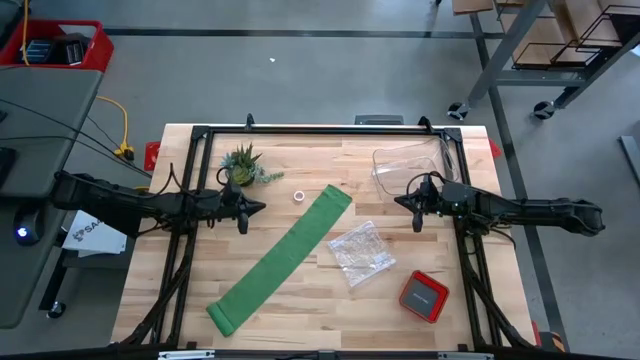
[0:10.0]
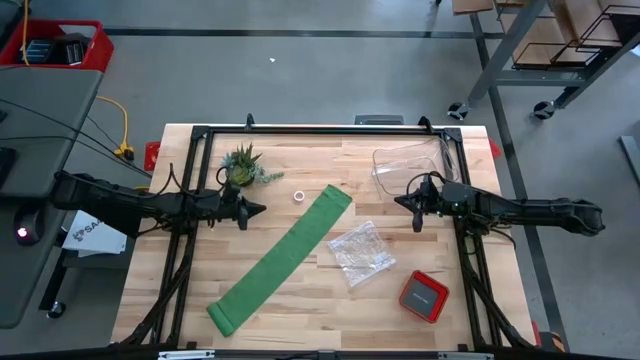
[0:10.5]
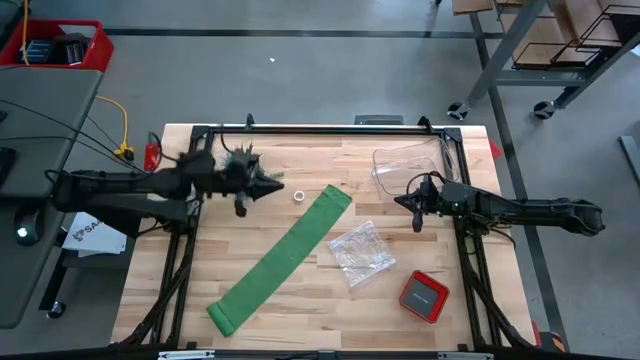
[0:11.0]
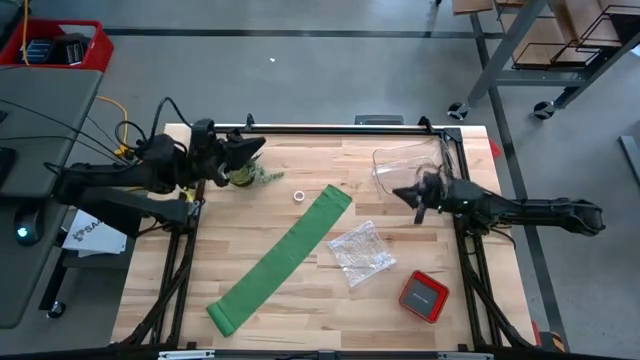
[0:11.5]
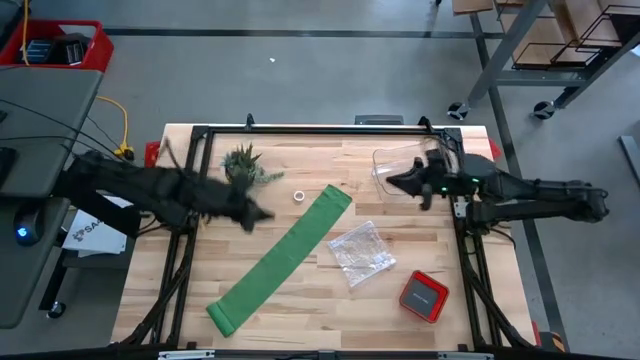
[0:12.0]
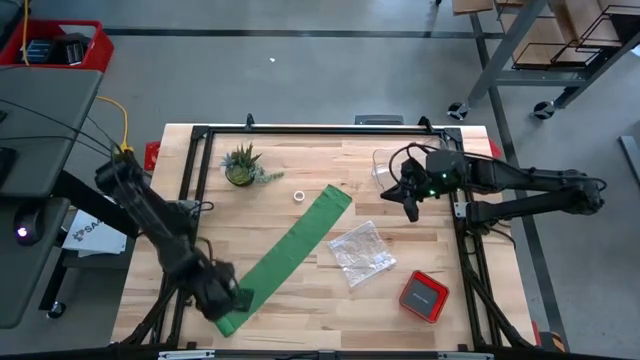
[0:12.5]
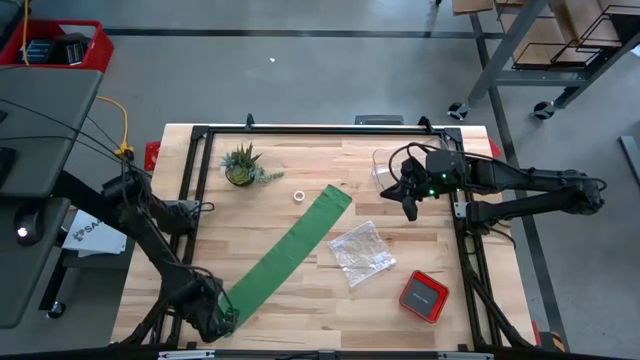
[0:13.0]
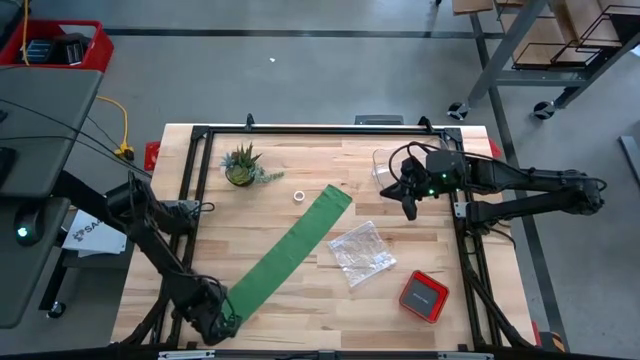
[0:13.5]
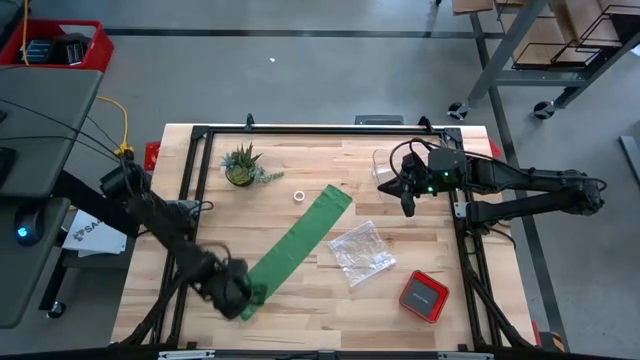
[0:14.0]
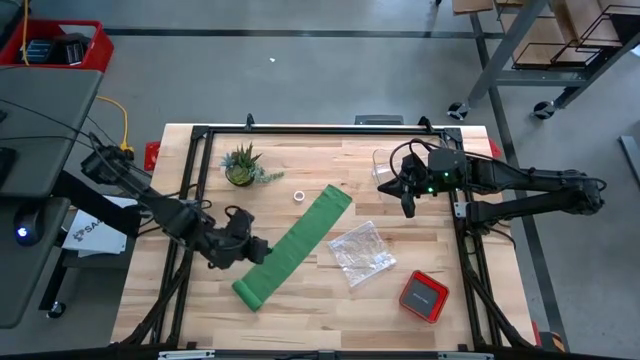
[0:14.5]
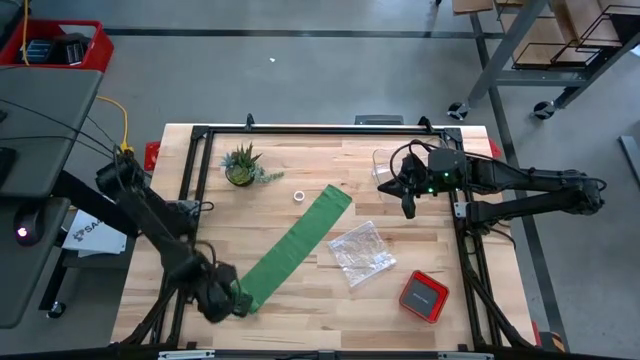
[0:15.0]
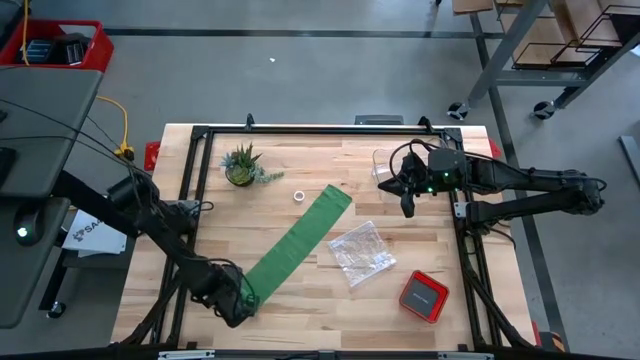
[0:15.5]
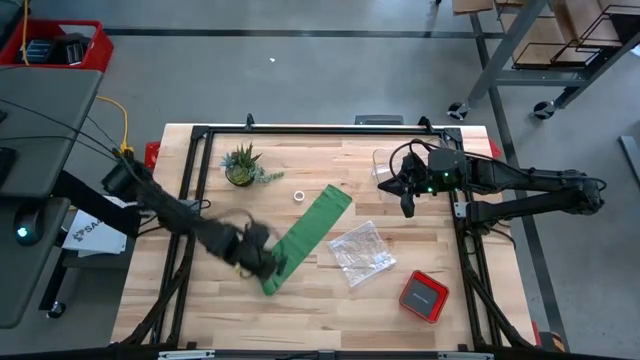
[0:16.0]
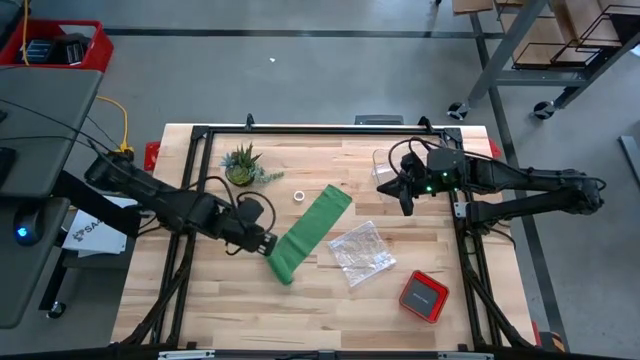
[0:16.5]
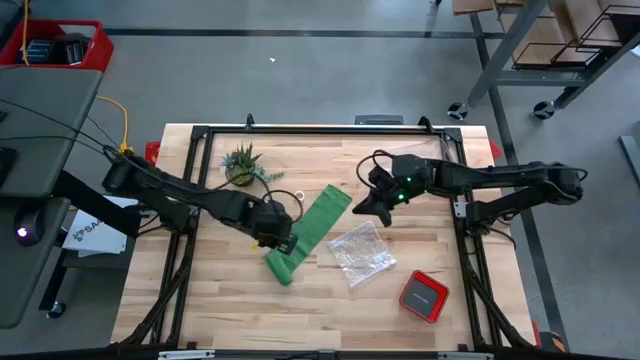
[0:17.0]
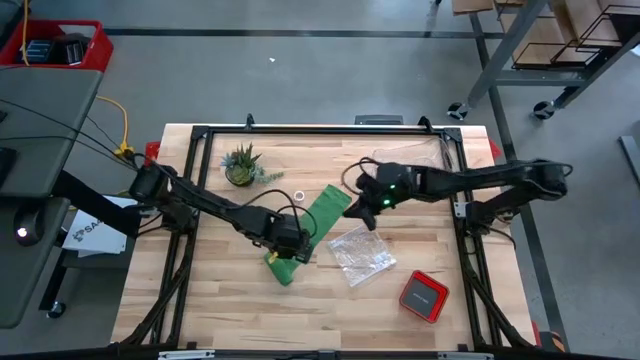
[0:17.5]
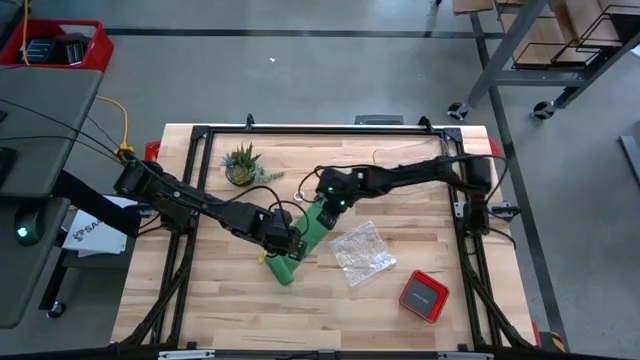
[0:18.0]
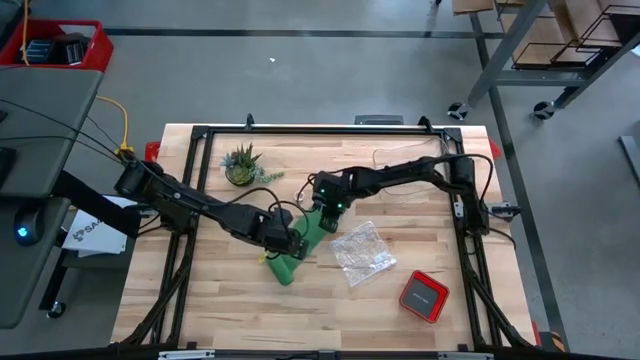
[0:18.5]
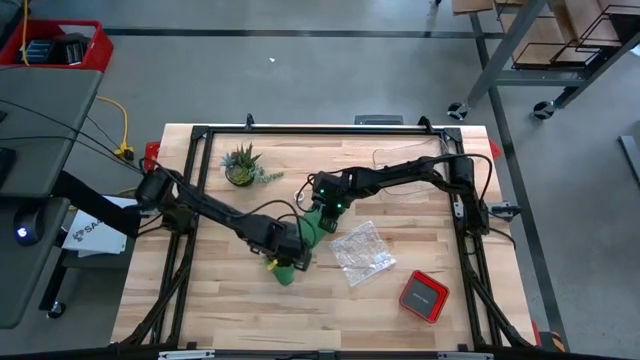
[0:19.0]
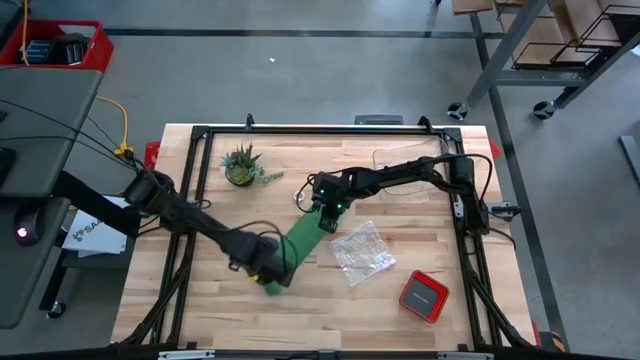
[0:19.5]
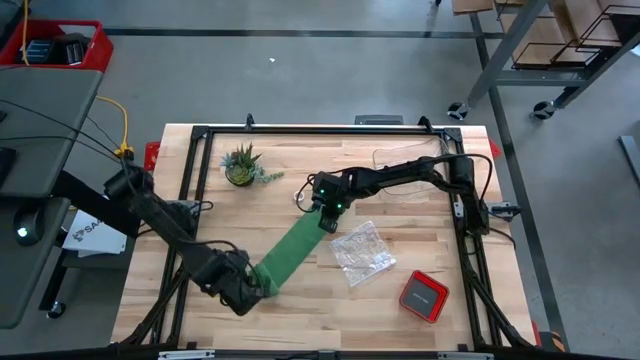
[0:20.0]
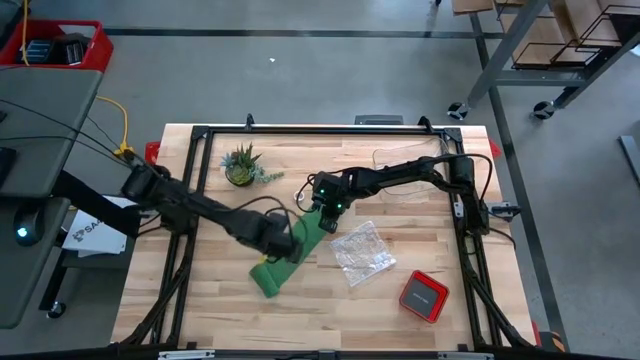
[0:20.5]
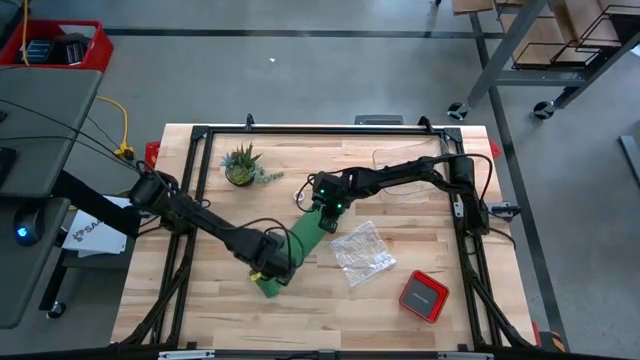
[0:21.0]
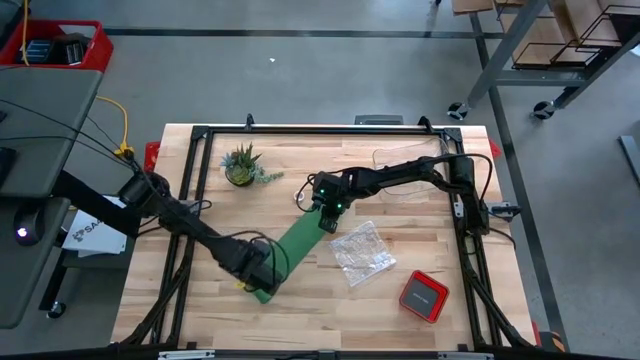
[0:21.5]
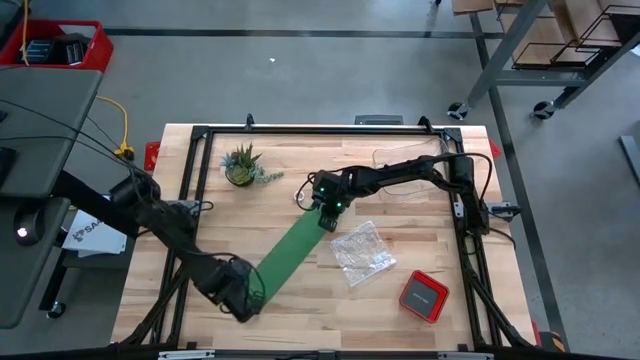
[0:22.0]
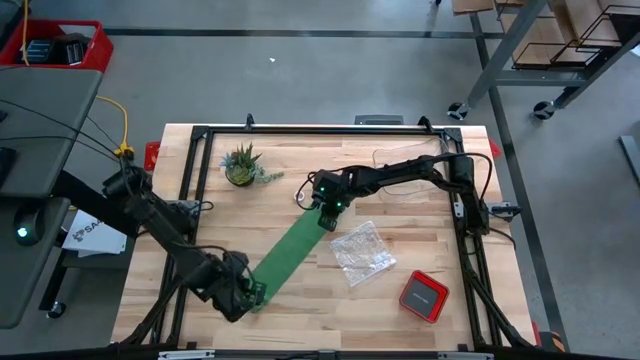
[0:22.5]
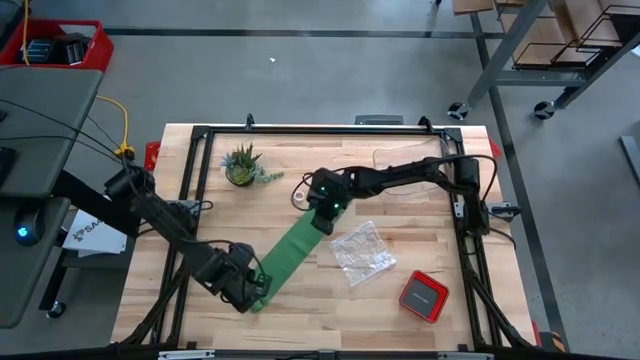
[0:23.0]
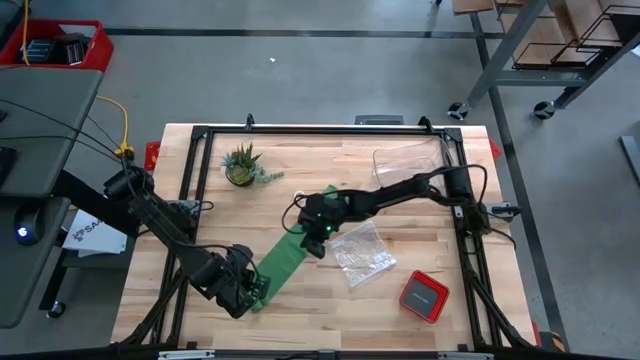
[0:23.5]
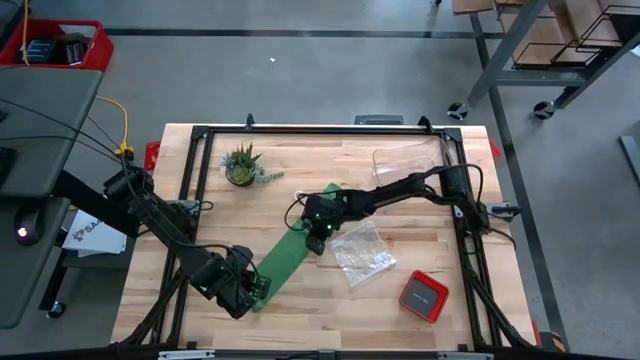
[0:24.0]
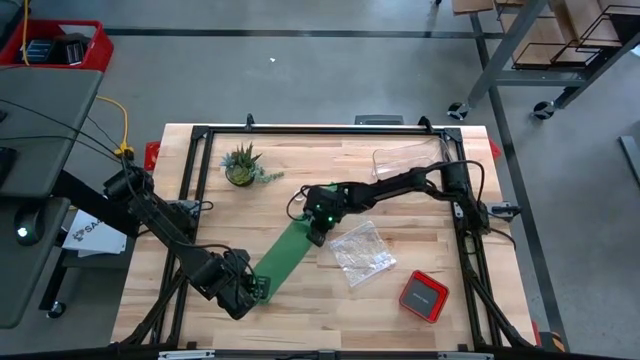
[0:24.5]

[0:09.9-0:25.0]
Task: Roll bandage
Roll the green bandage

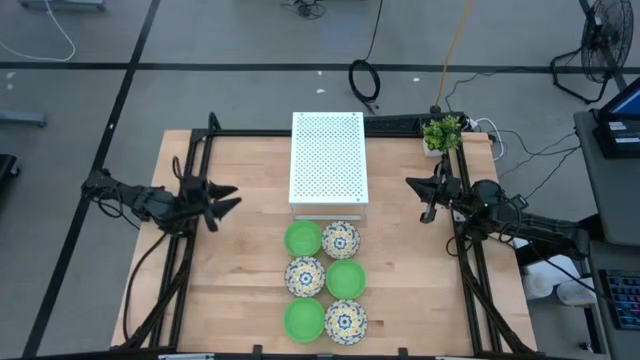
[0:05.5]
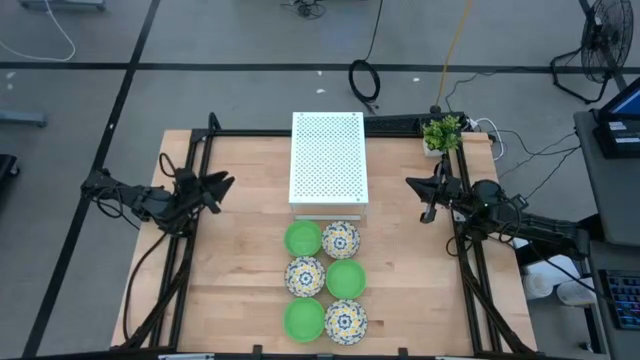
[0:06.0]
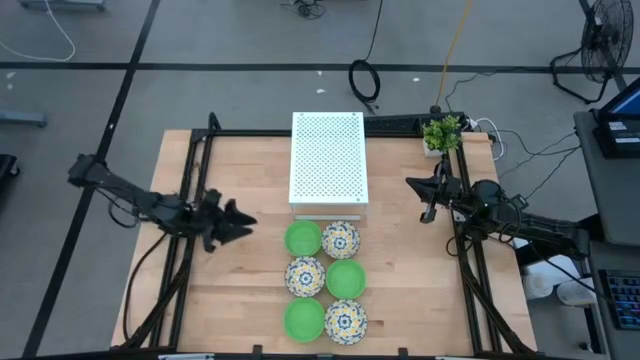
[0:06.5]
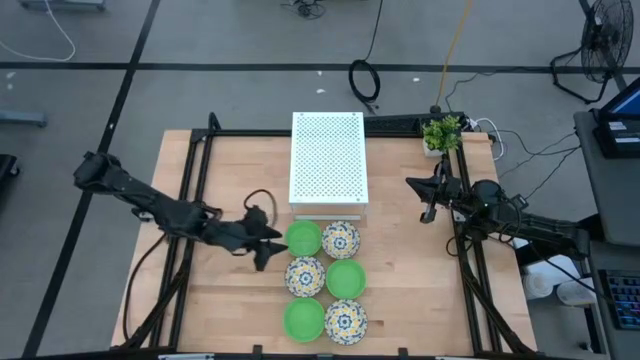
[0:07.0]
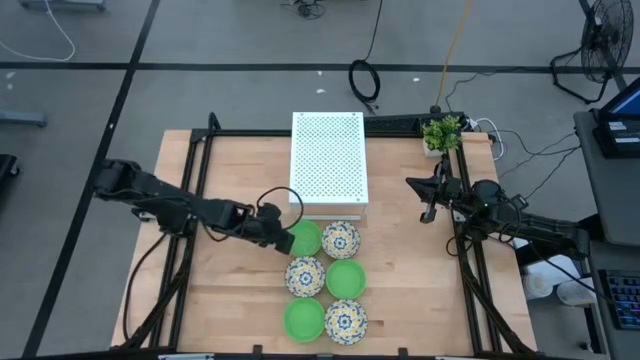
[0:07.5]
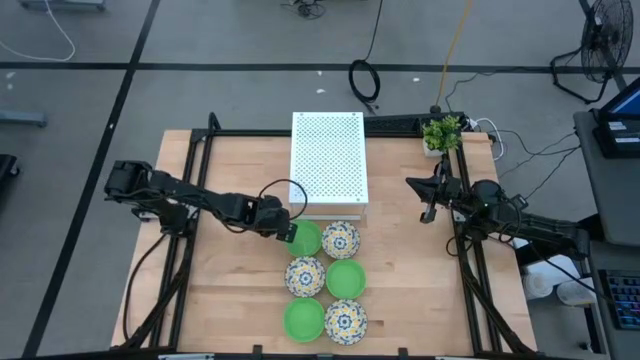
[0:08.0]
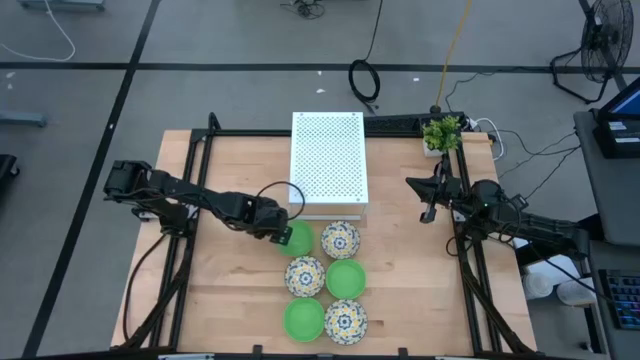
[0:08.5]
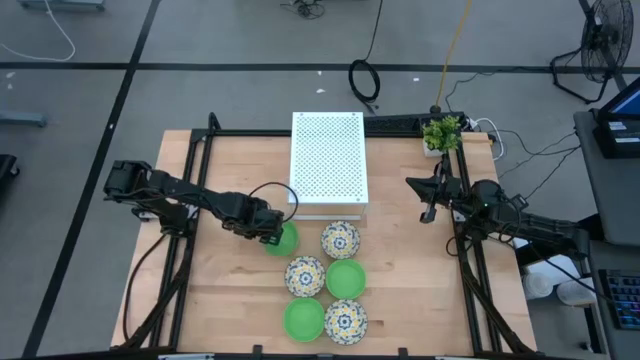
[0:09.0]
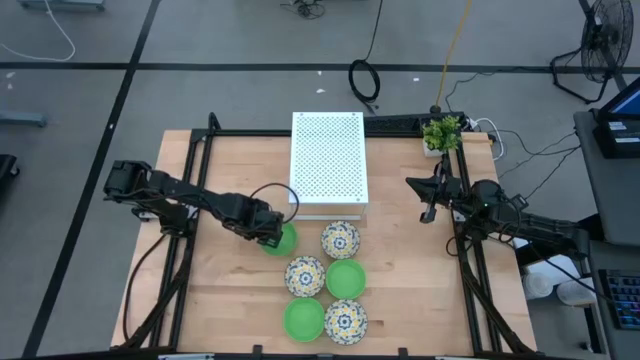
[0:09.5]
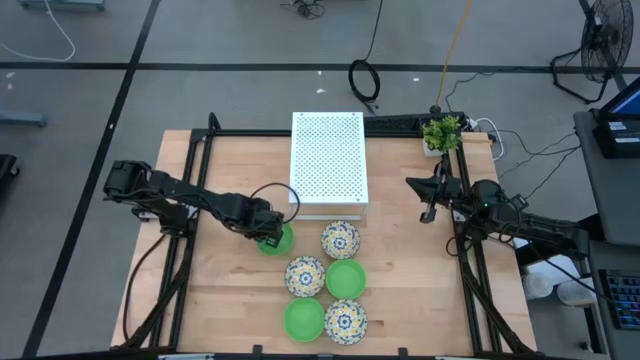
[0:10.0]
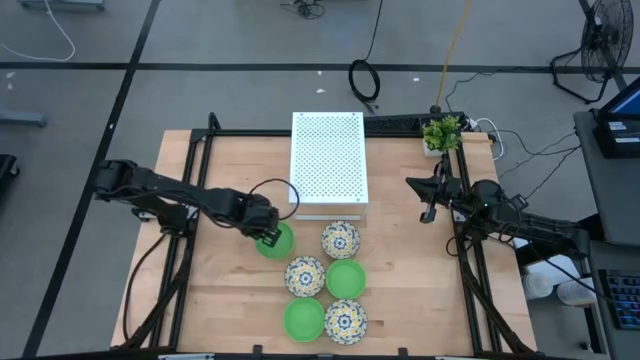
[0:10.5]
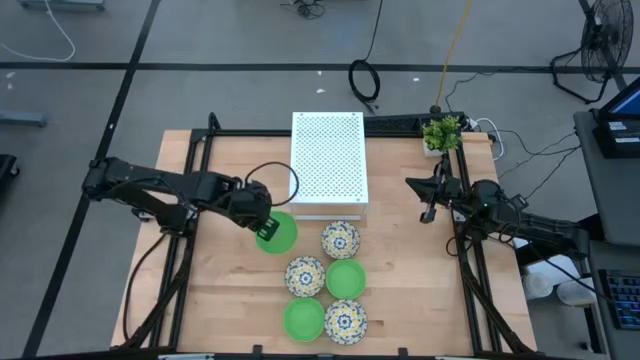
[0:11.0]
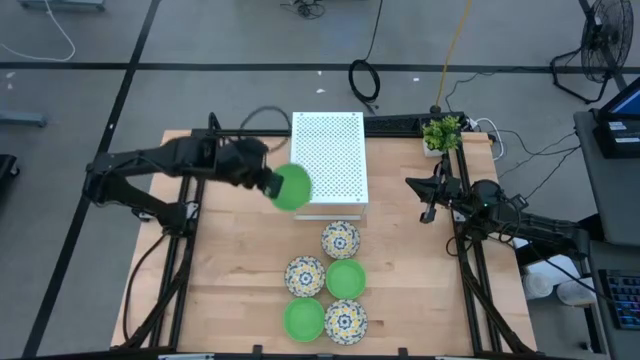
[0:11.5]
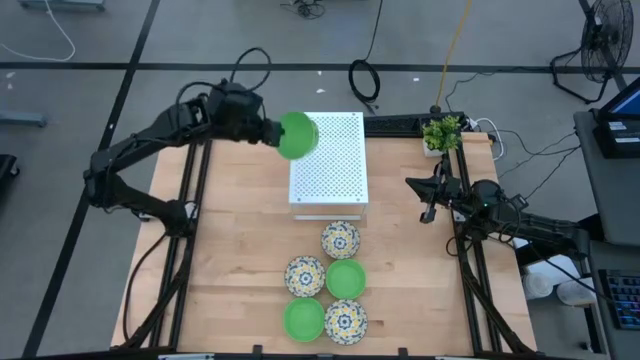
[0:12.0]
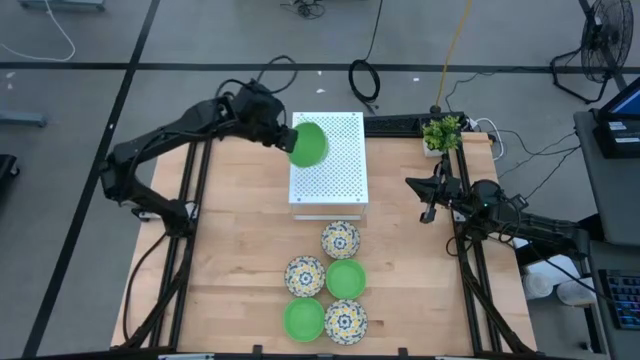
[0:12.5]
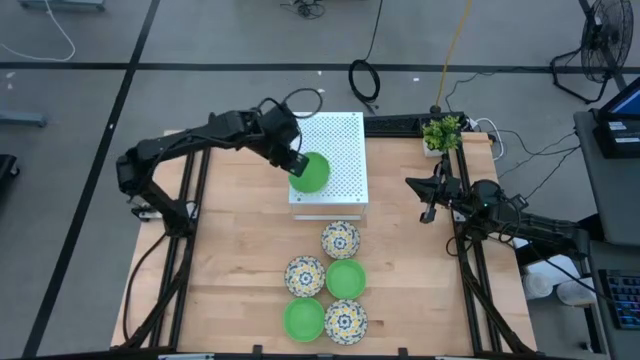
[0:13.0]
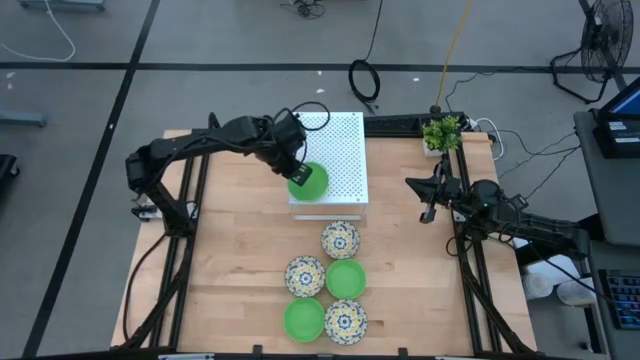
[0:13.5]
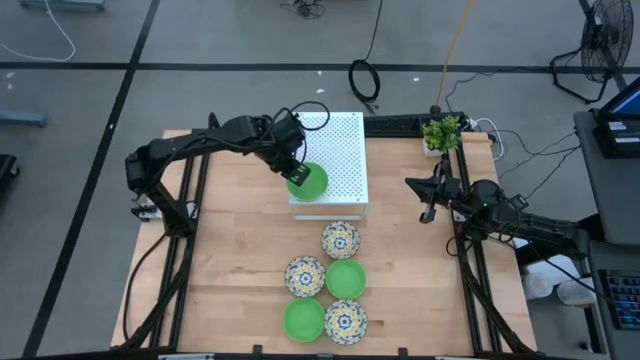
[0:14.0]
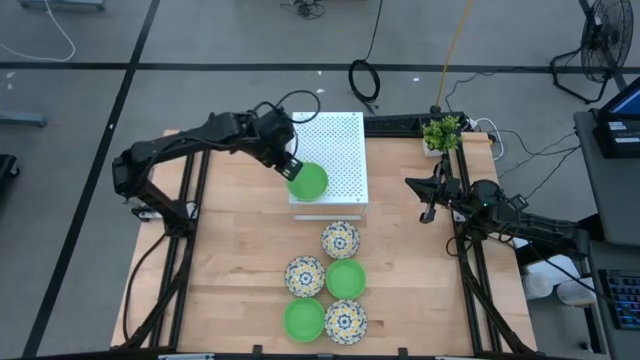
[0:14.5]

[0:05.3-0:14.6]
Task: Pick & Place Mini bowls
Put the top green bowl on the shelf
